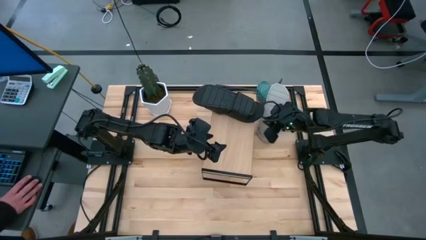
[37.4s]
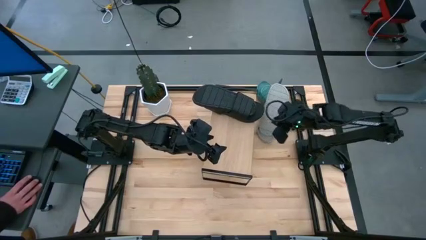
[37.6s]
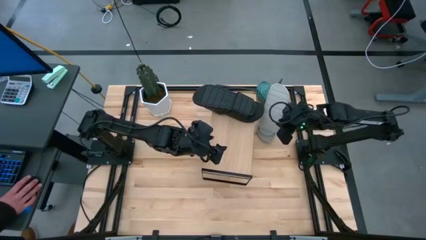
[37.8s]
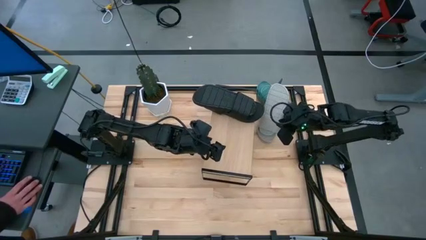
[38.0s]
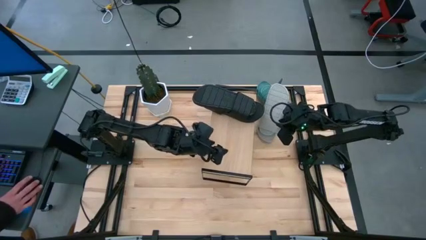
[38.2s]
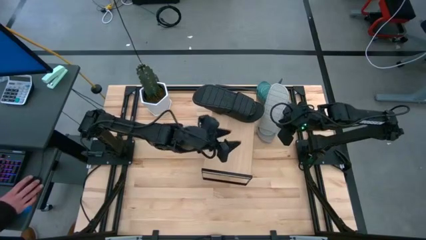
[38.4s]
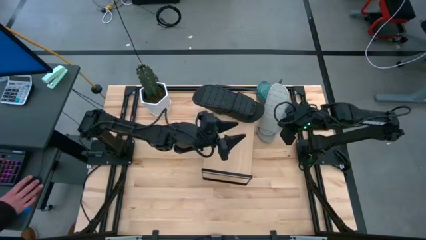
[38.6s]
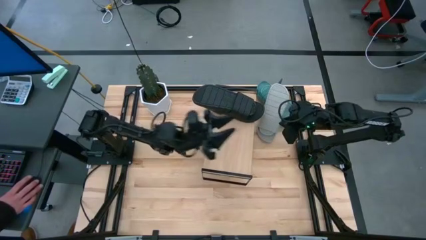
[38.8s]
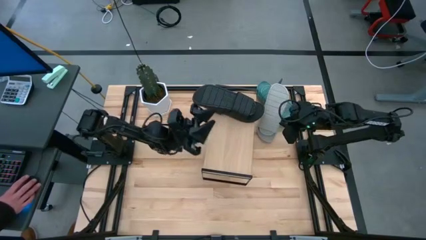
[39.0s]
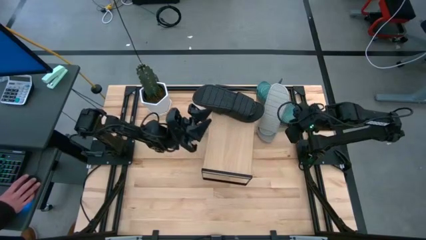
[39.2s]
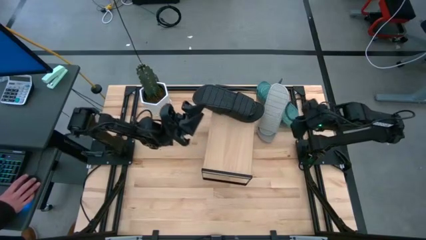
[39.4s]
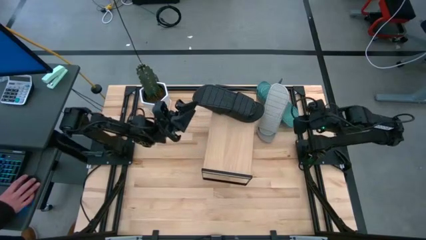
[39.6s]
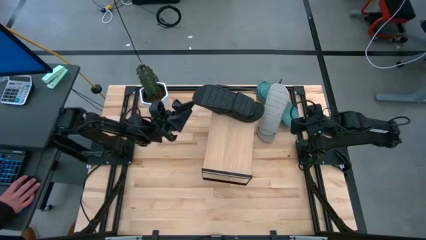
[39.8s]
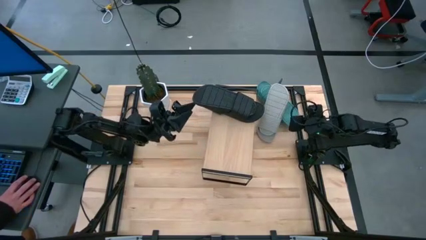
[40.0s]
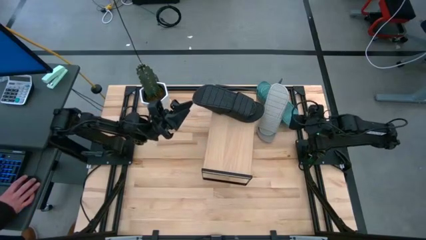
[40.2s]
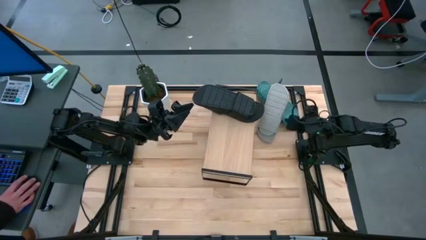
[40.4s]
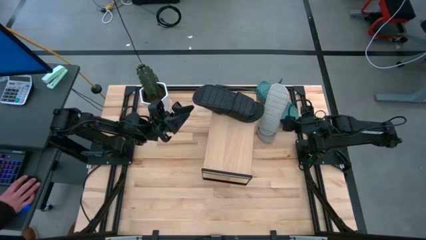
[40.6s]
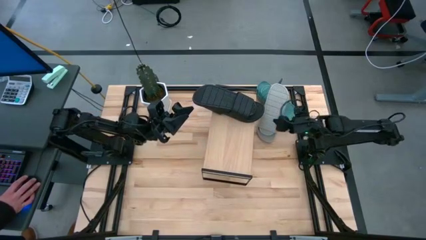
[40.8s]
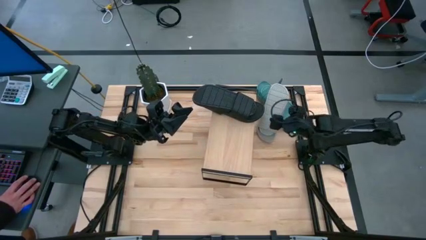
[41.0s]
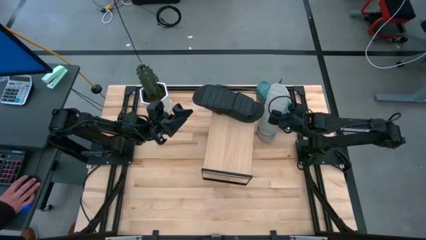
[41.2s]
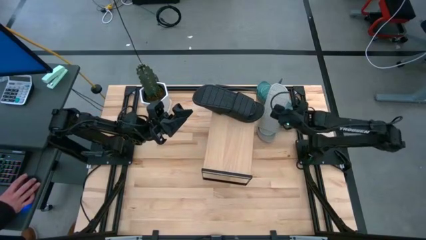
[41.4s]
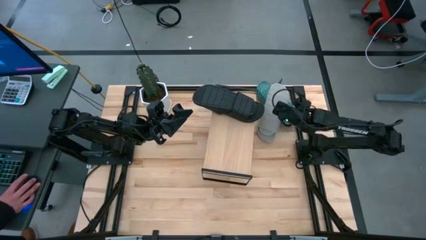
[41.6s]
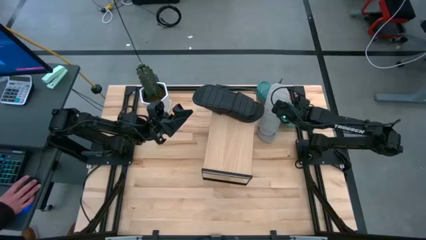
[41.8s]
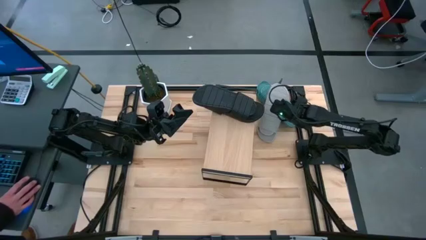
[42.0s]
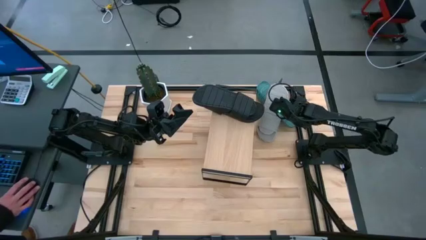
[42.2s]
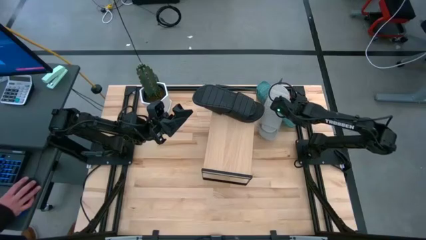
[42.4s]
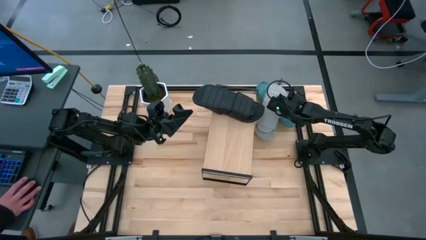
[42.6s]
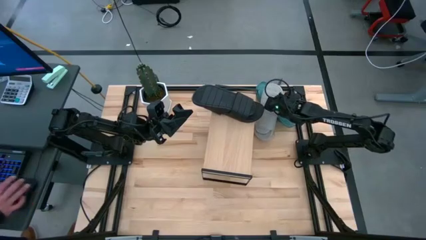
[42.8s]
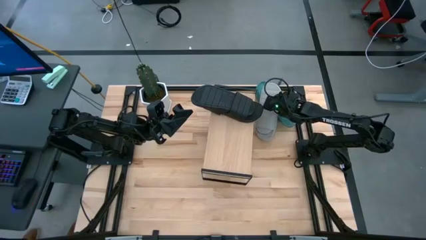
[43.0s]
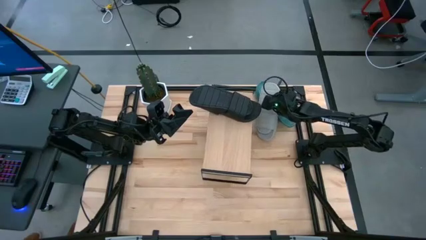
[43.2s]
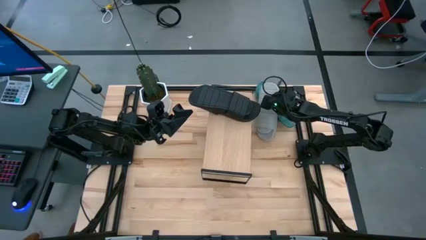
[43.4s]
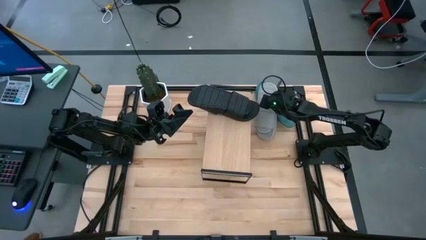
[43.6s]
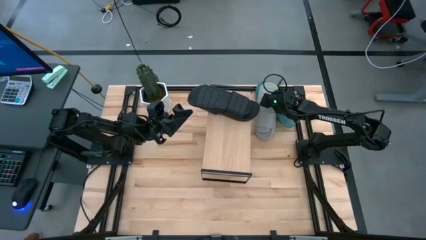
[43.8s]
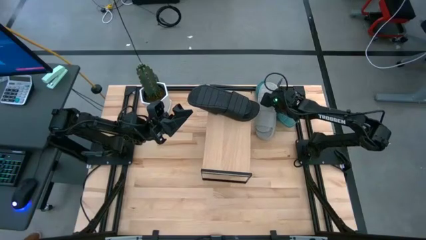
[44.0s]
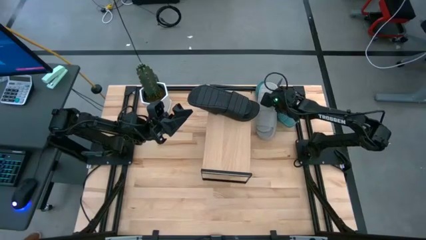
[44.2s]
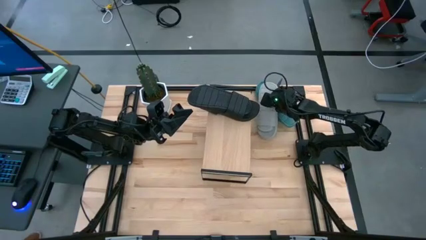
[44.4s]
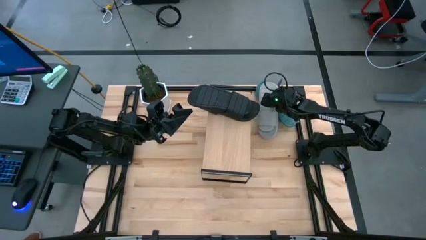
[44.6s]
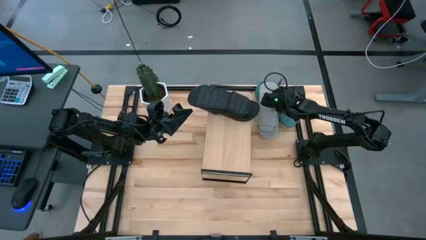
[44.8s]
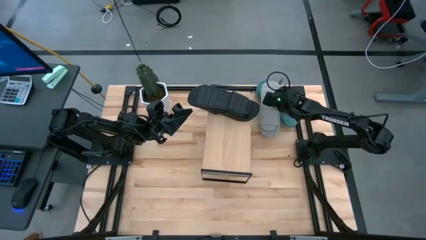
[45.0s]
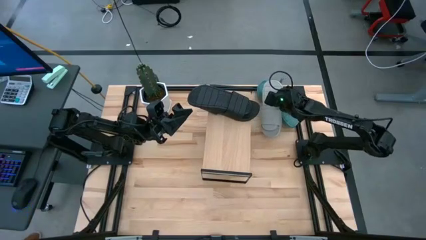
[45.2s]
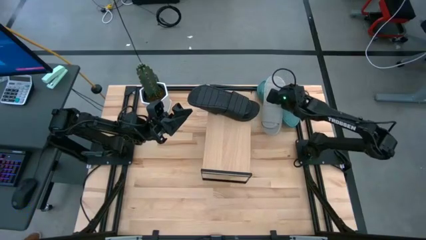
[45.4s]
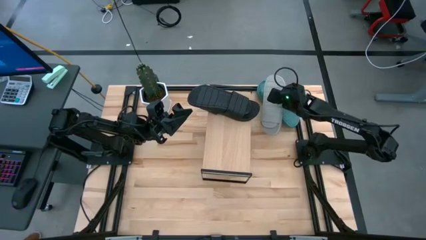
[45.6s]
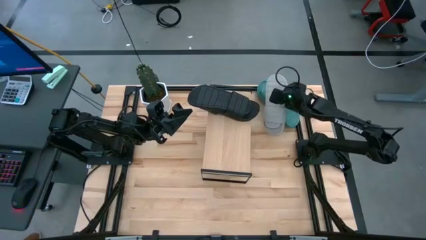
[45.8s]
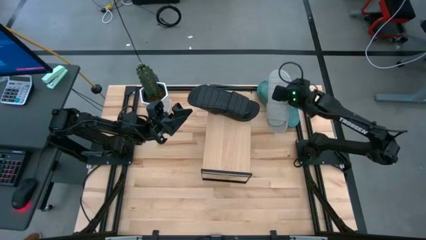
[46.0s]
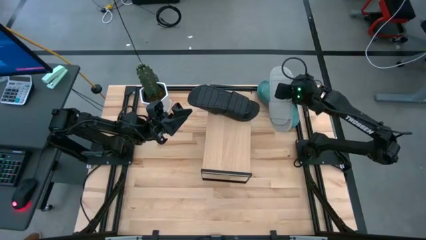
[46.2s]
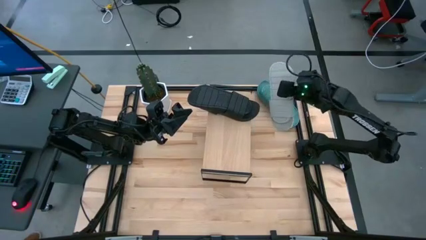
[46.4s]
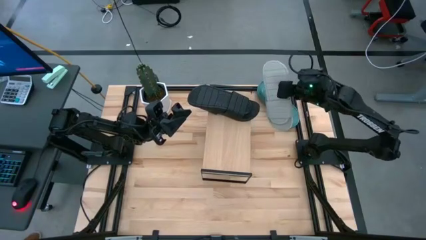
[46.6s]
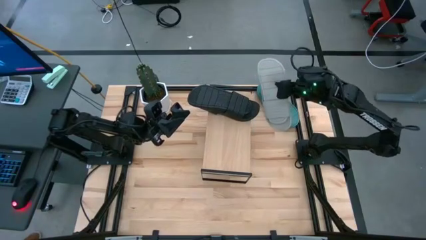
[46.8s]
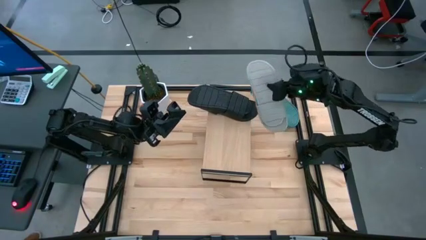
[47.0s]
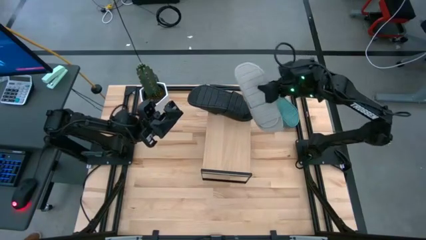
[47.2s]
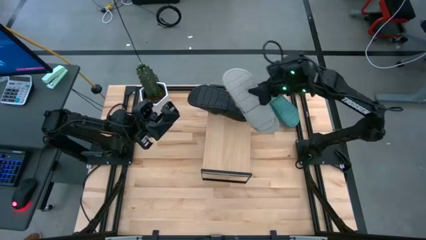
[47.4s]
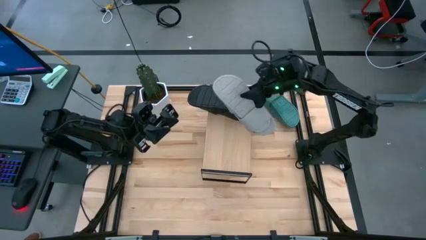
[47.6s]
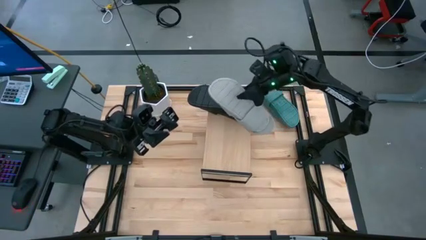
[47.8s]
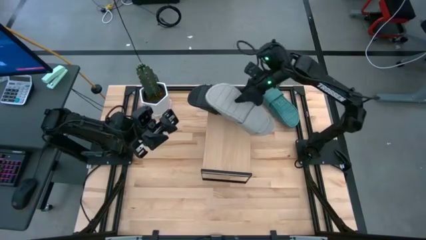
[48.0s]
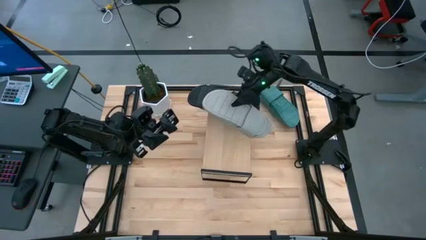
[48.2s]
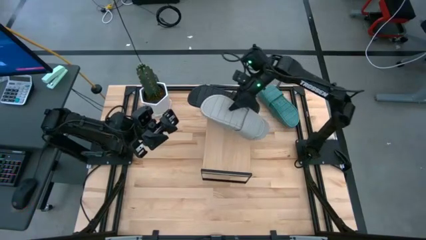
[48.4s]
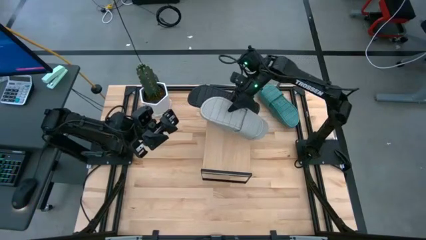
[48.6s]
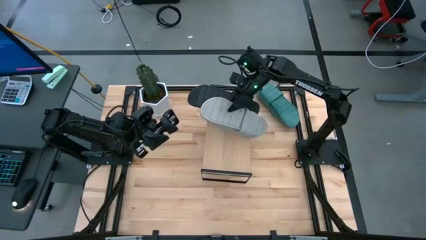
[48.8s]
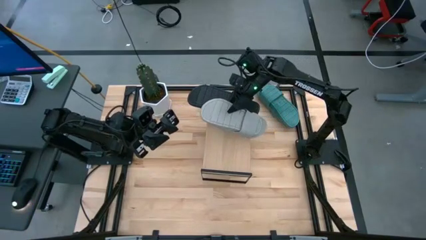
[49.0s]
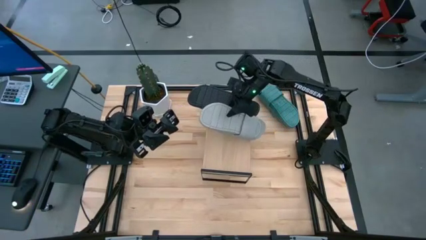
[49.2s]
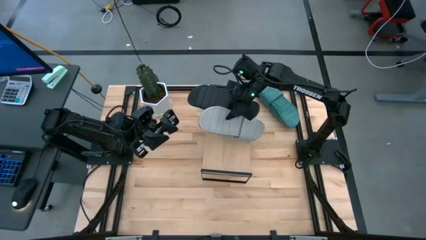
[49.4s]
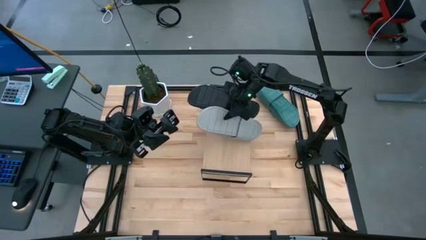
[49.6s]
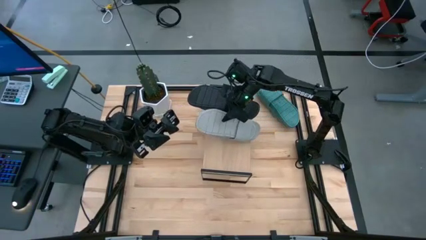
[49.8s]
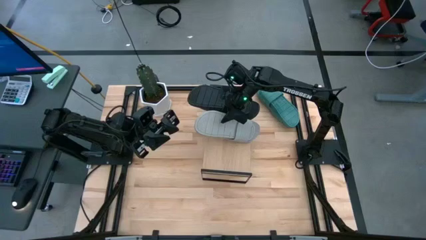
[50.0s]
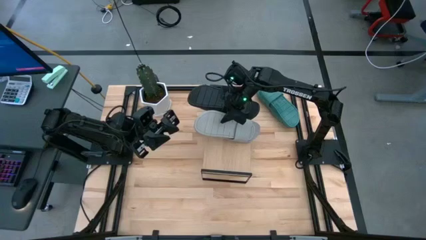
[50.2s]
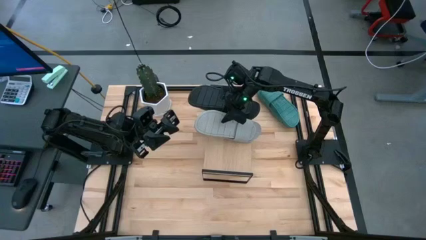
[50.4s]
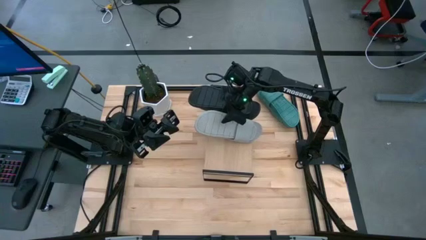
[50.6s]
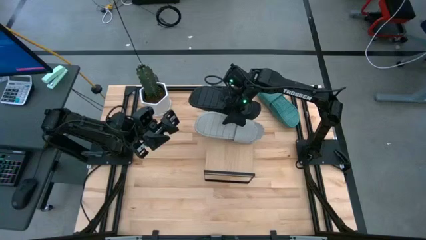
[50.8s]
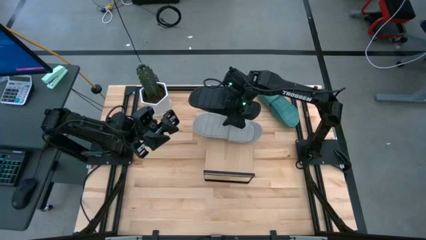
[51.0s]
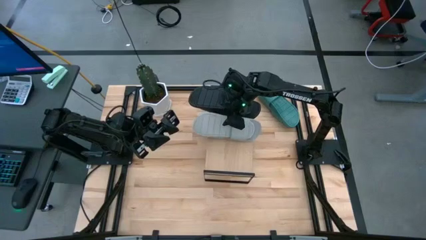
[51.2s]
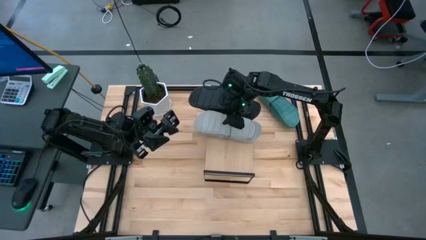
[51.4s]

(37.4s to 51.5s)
Task: Pick and place slides into the shelf
Put the gray slides on the shelf

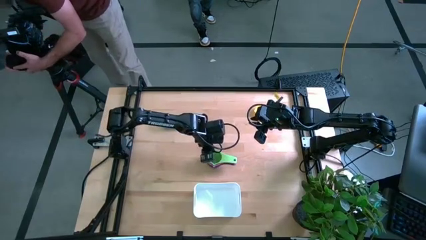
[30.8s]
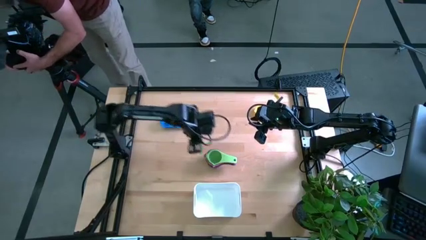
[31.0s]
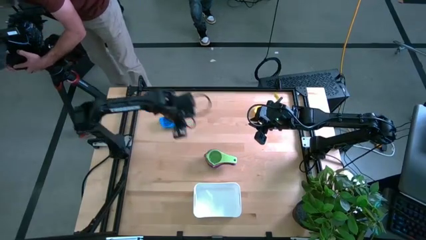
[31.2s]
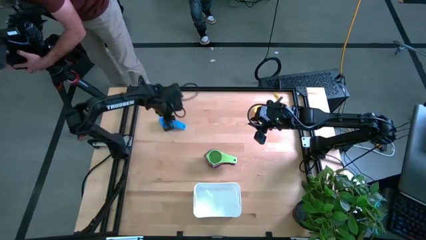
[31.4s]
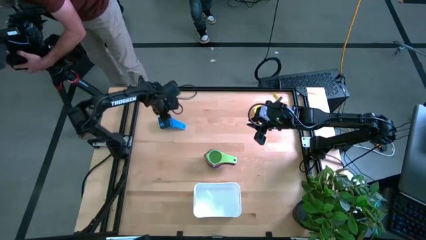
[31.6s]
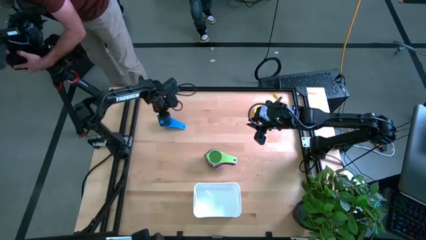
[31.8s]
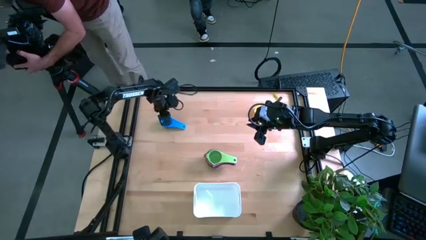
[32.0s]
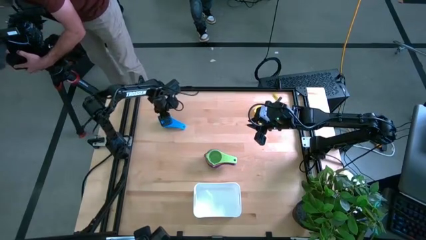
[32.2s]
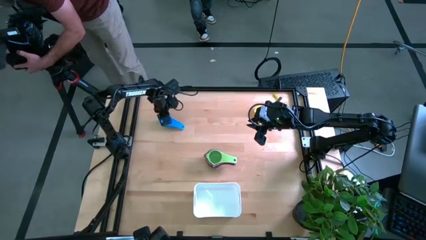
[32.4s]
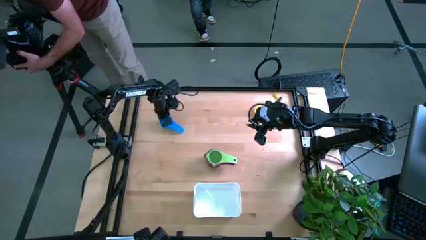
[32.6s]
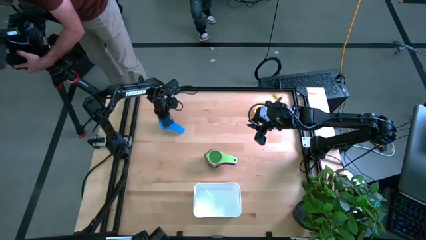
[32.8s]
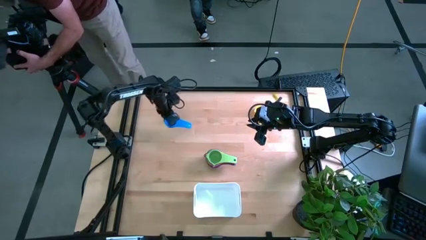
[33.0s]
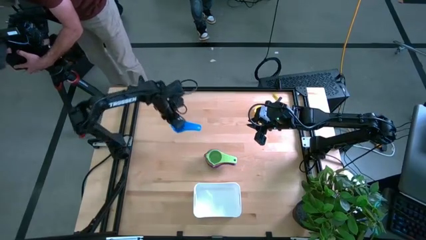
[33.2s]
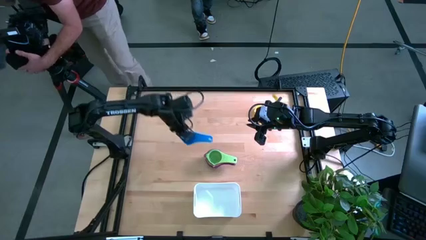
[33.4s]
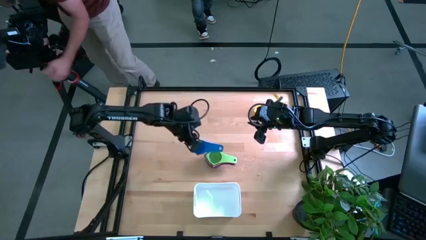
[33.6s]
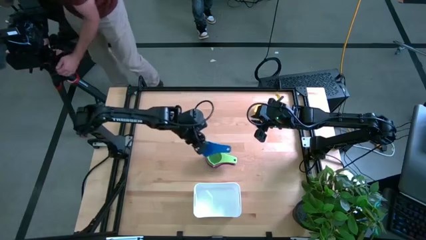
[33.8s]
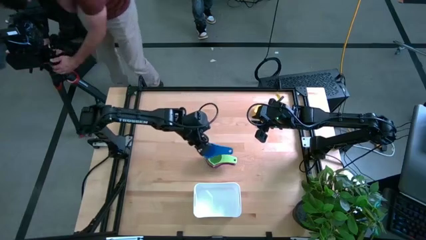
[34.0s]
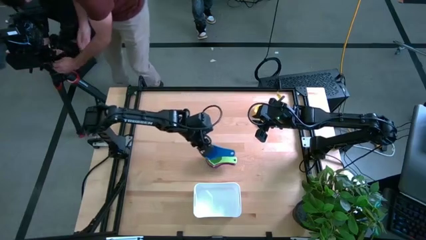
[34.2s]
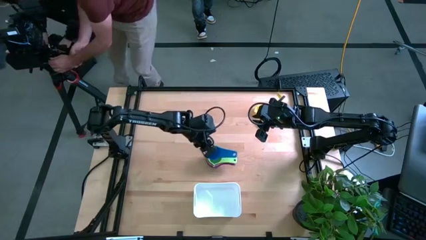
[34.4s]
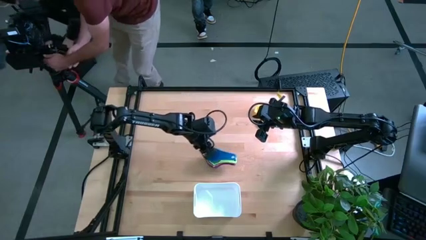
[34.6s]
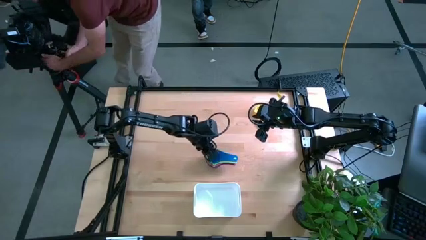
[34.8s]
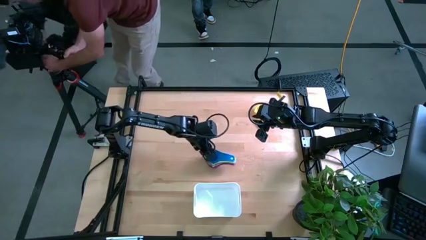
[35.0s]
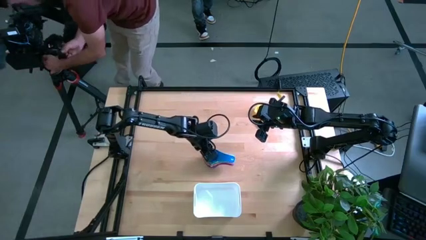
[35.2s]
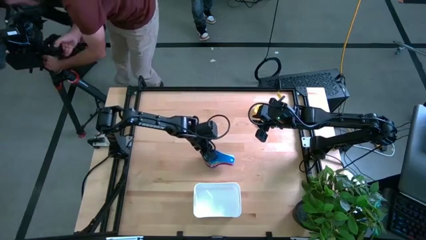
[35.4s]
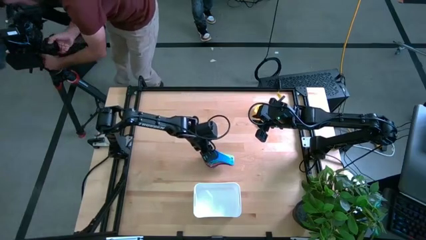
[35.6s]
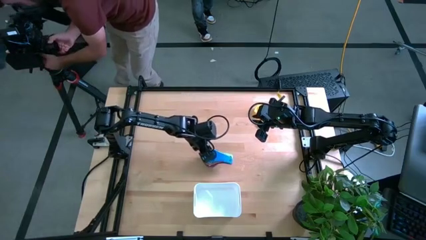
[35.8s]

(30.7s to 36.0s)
Task: Nest measuring cups in basket
Stack the blue measuring cup on top of the green measuring cup
